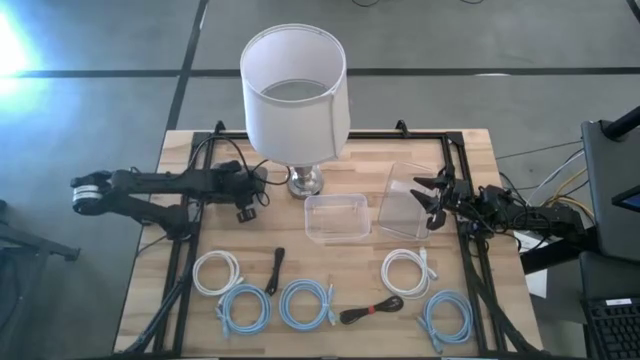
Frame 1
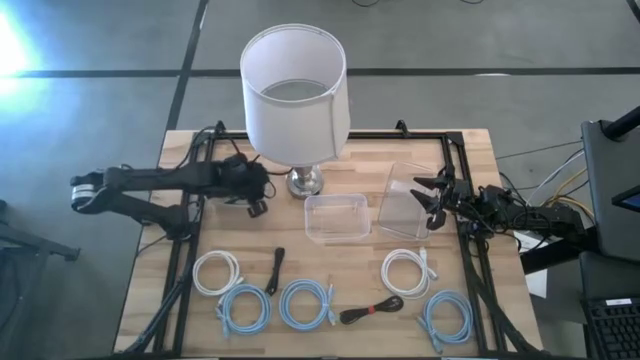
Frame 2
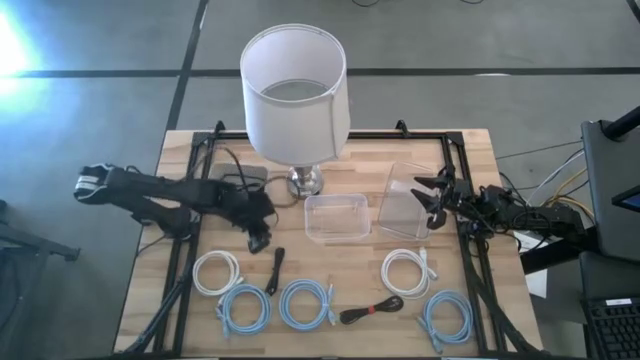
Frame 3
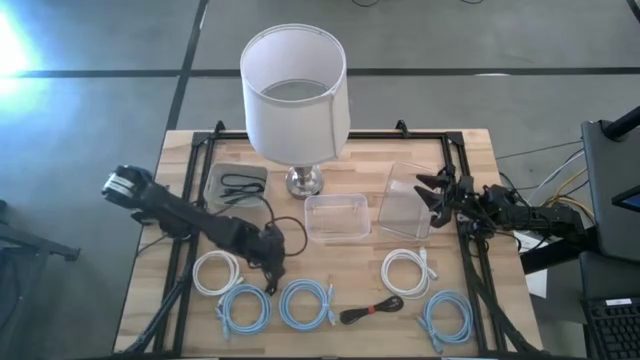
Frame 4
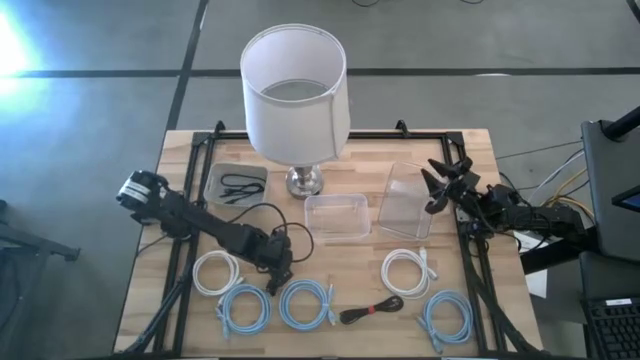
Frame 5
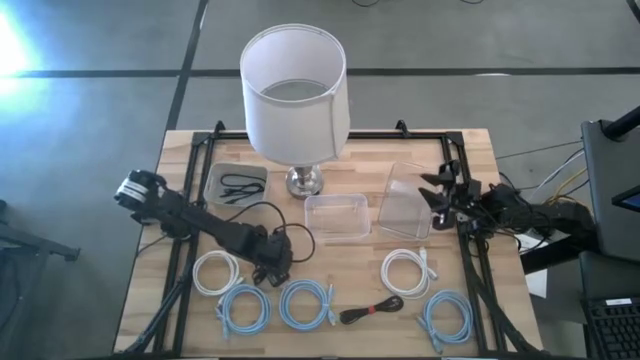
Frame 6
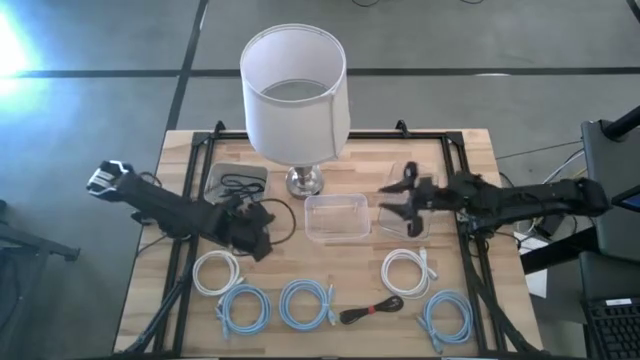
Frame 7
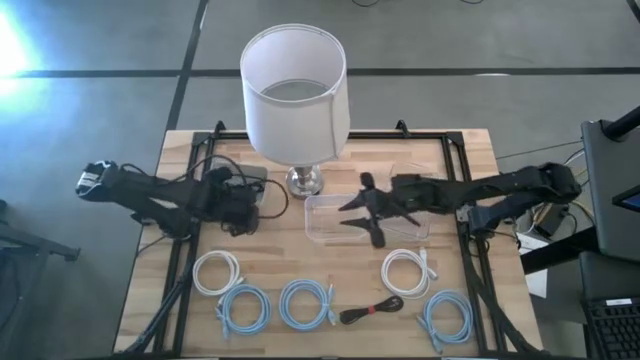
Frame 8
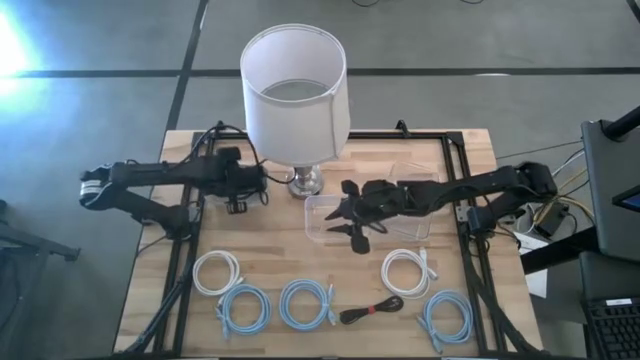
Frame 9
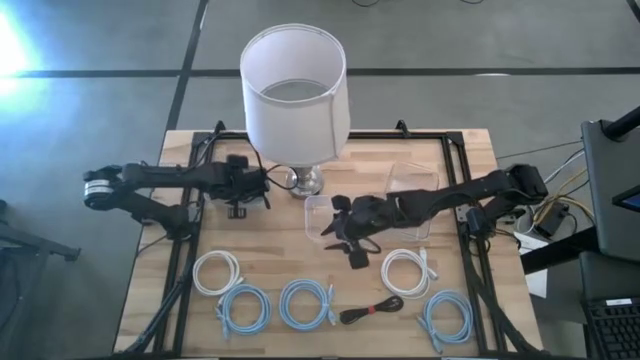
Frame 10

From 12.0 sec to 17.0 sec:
Task: Pick & Place USB Port
Put the left black USB cable into the gray bin

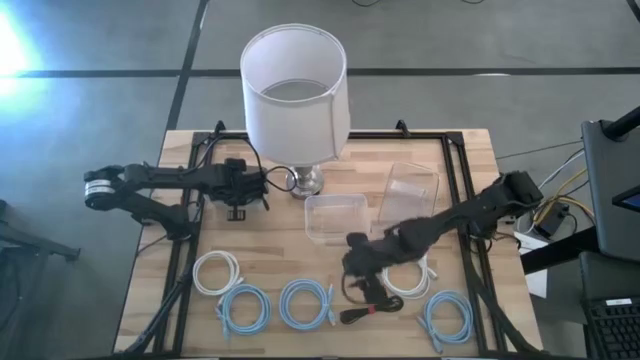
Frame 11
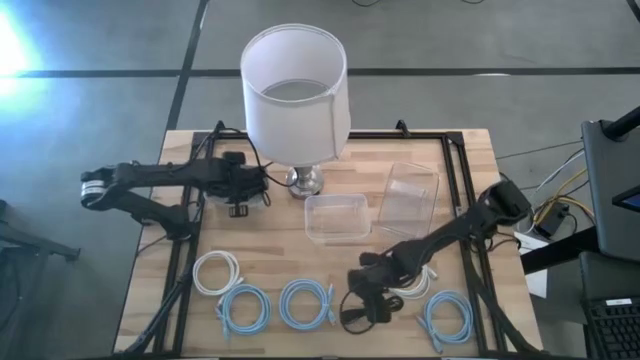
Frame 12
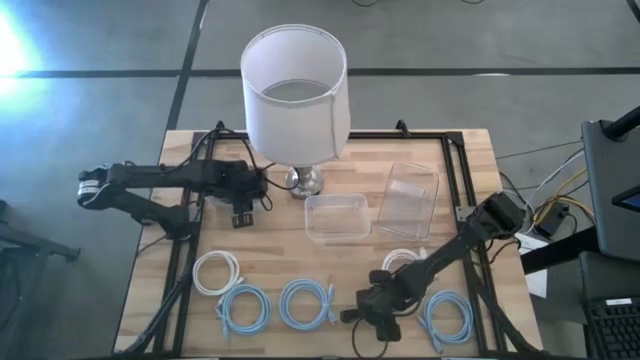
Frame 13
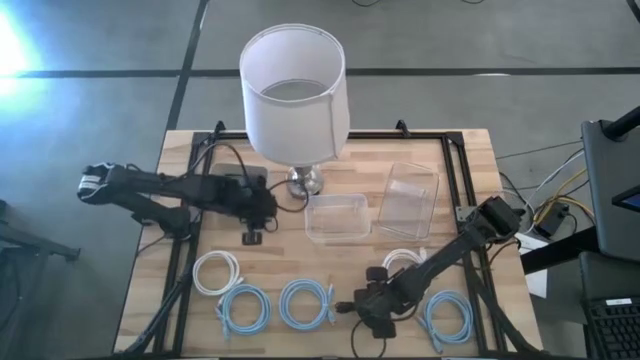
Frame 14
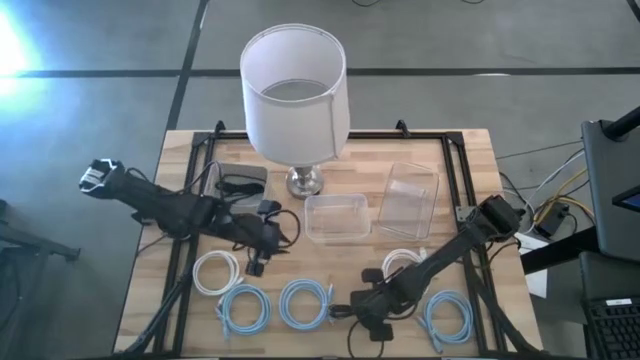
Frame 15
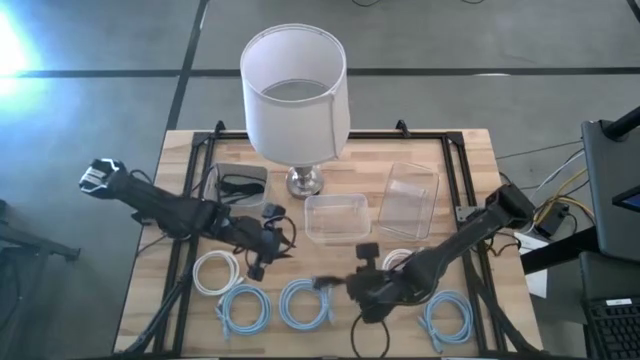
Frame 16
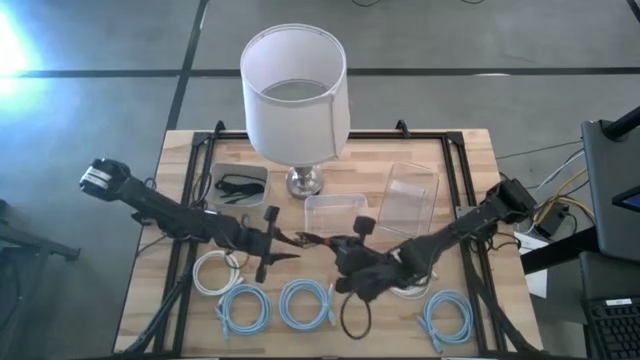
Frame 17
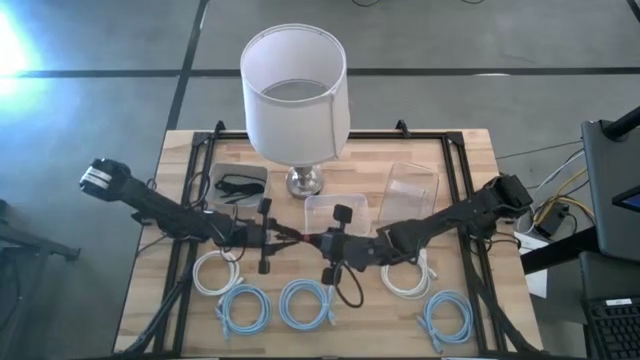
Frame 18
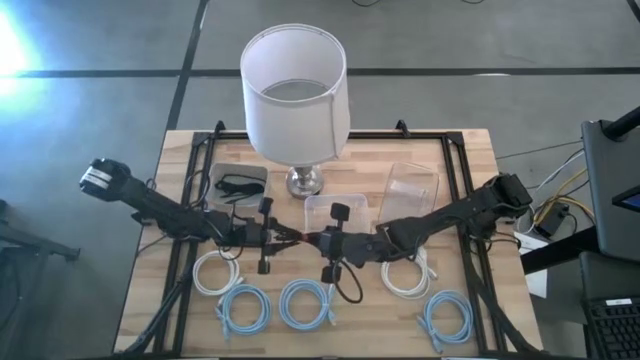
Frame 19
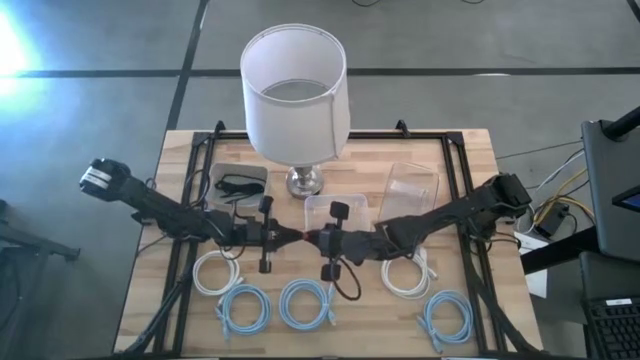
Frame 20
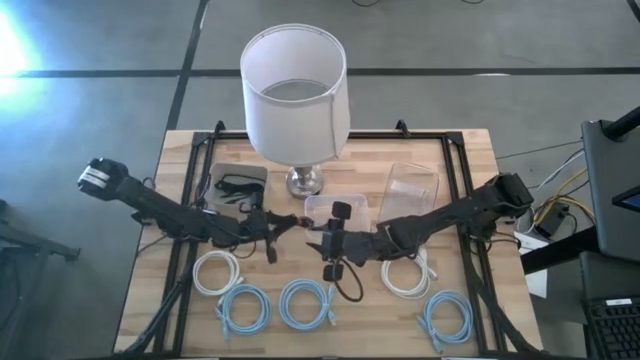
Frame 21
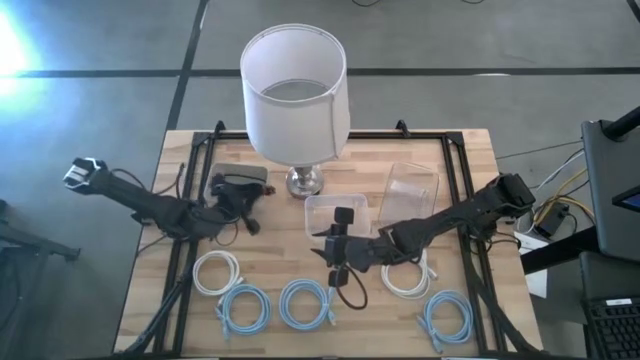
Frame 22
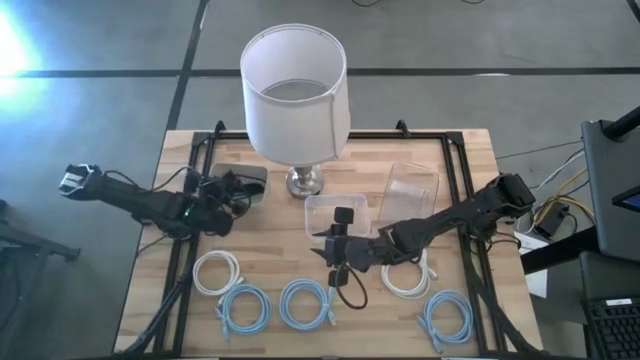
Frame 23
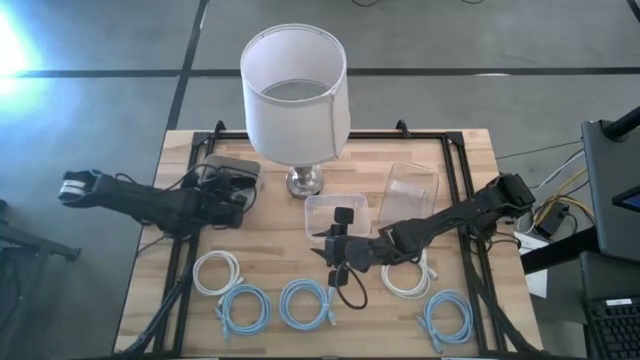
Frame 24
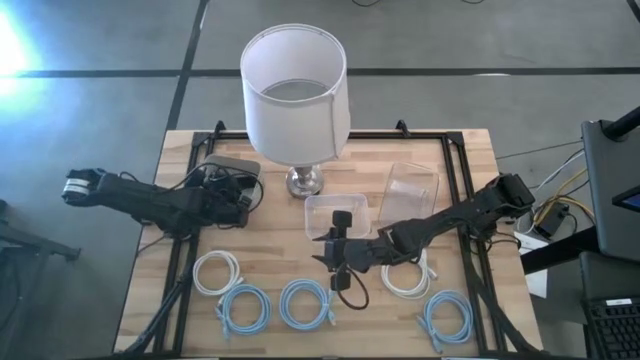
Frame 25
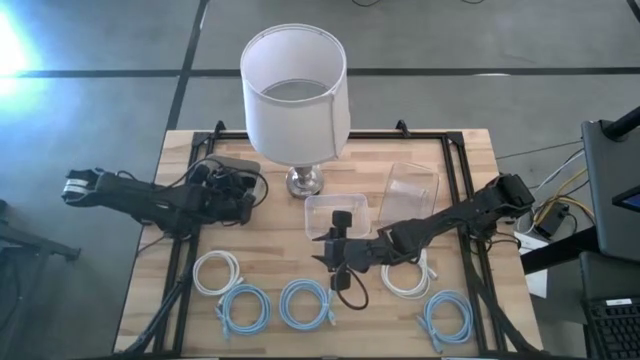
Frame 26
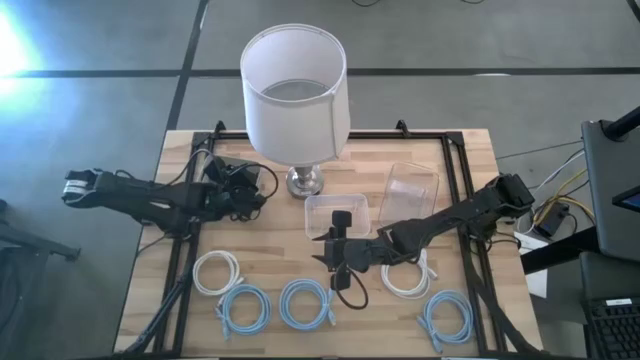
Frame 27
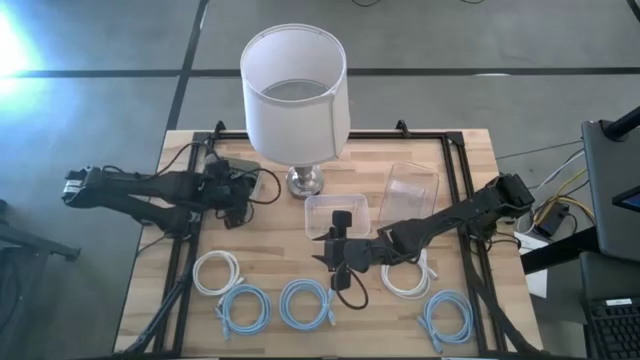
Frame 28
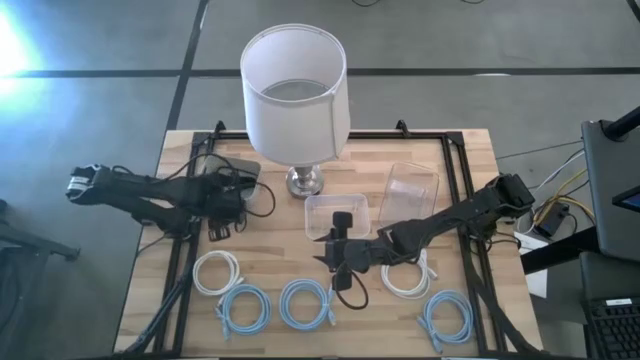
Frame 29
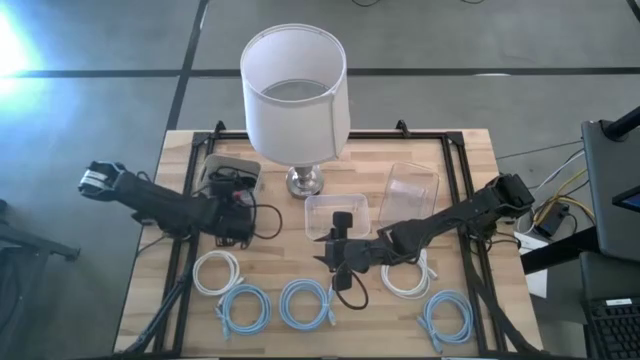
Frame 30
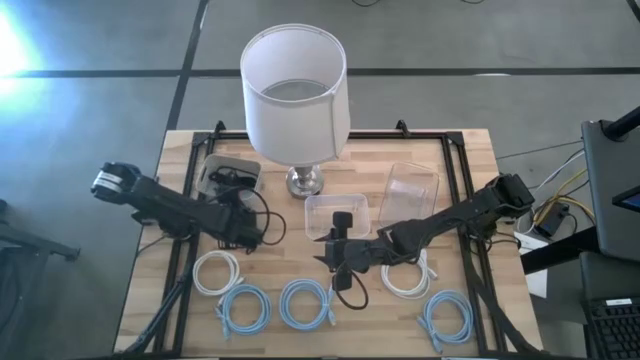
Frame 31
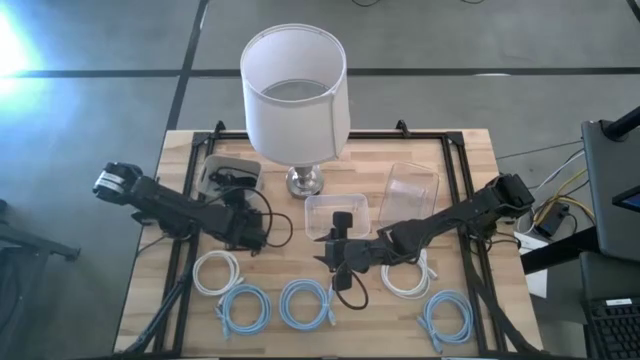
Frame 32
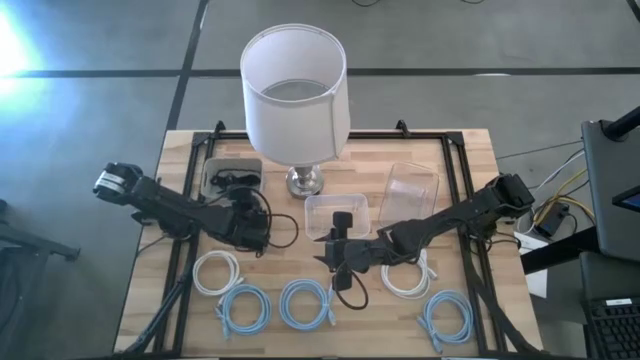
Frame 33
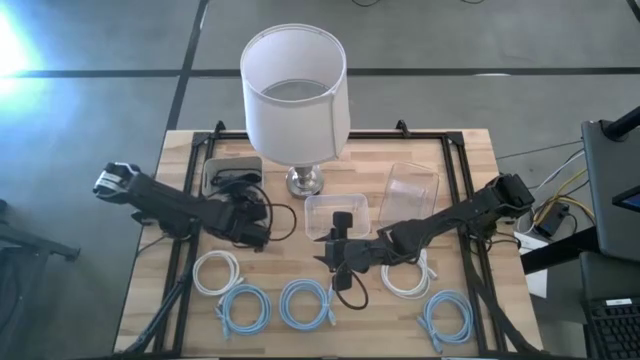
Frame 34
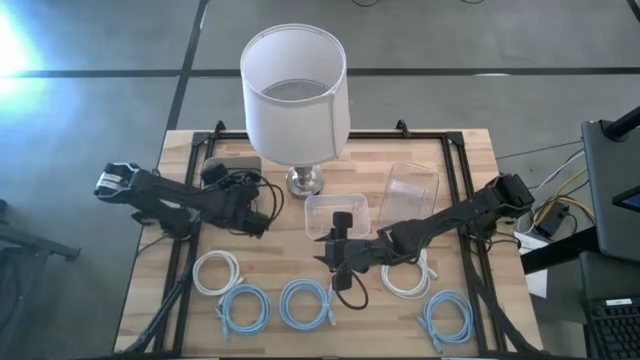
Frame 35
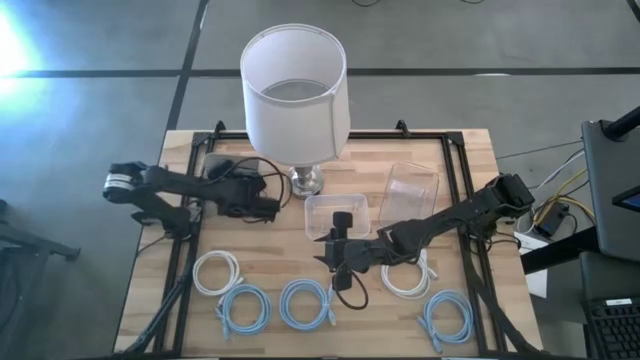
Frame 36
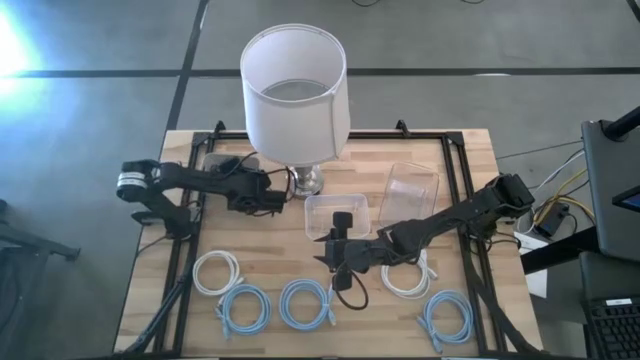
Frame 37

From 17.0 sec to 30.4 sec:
Put the black USB cable into the gray bin

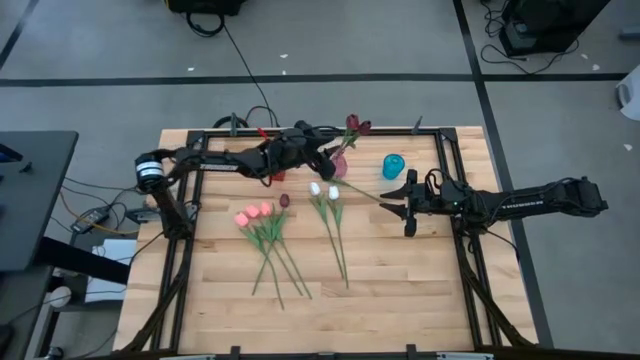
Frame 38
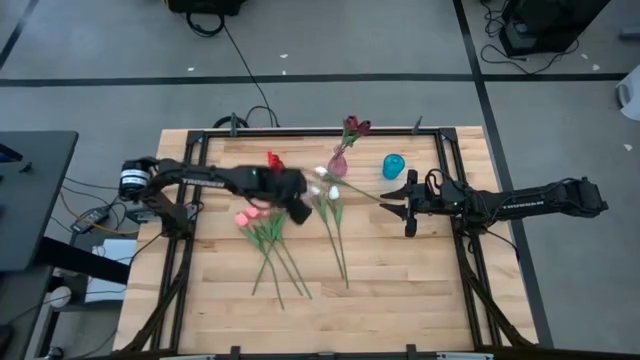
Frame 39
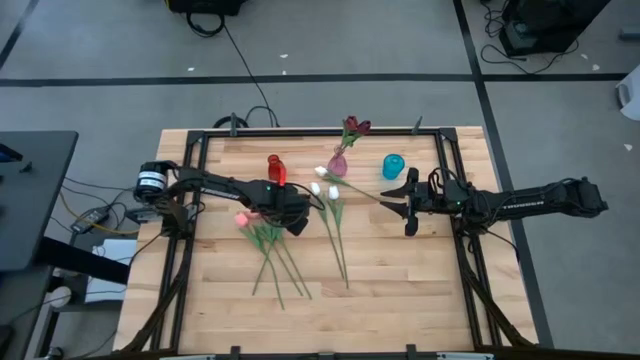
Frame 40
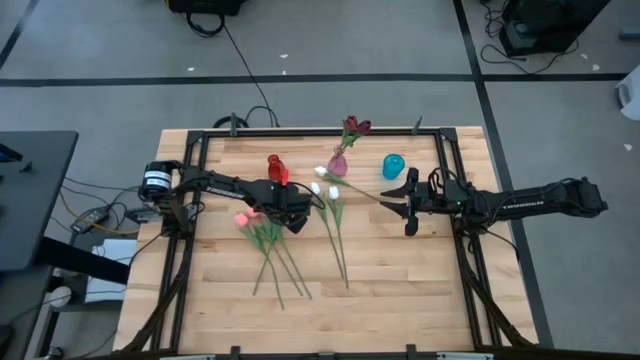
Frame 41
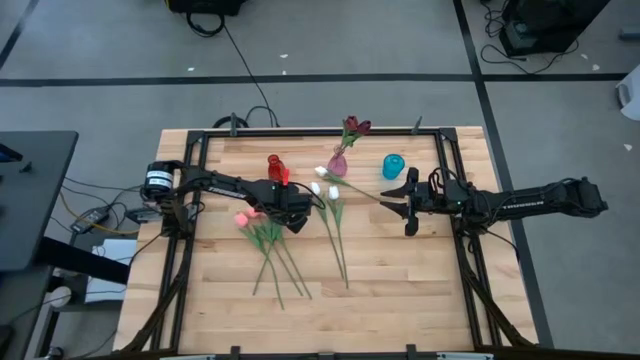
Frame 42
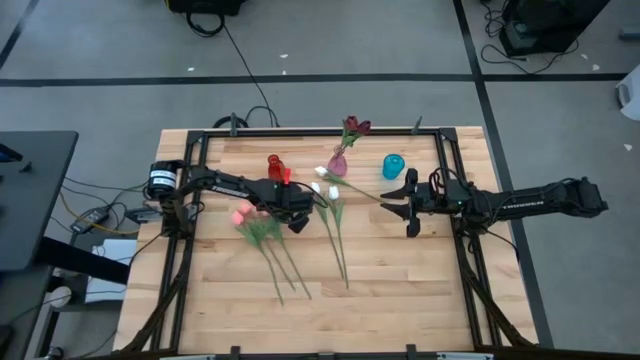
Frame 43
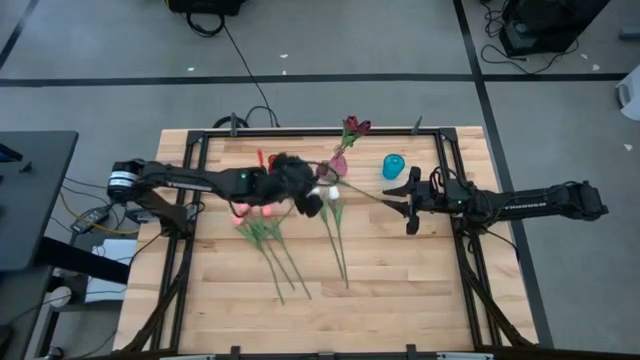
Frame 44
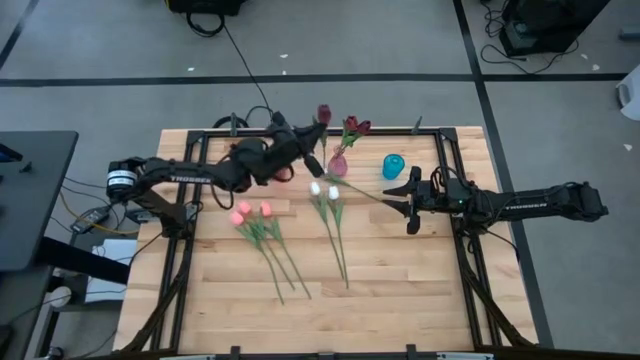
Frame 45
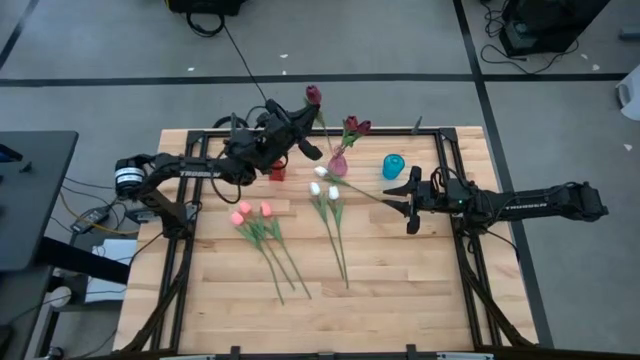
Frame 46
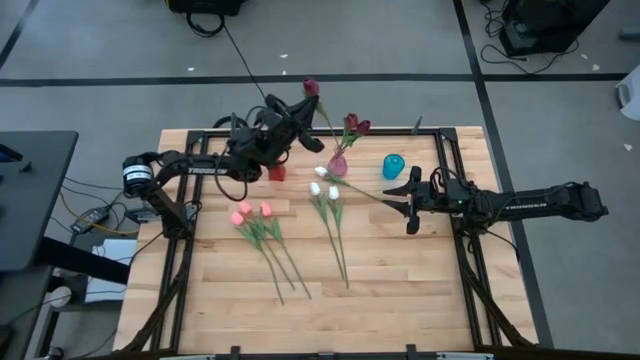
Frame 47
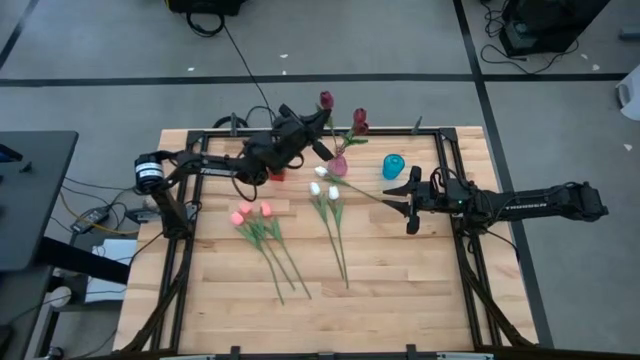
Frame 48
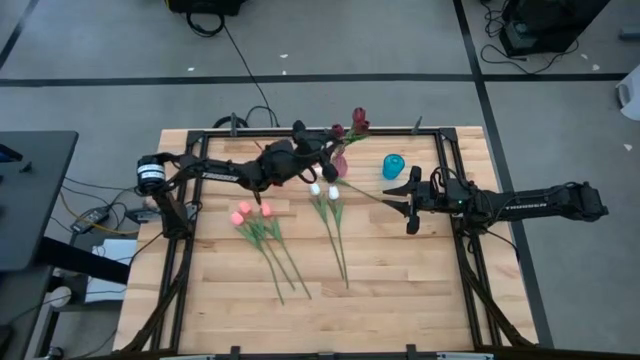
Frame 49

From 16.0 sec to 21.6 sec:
Task: Sort flowers into vase by color
Put the dark red flower into the pink vase
